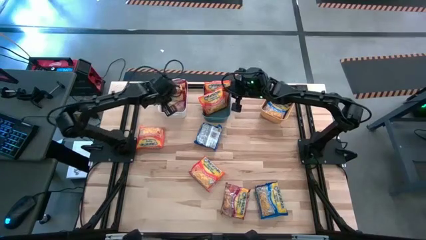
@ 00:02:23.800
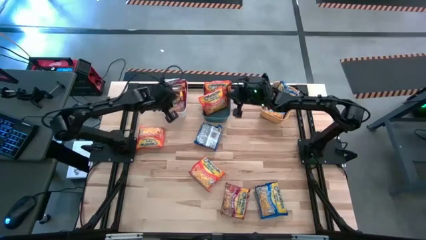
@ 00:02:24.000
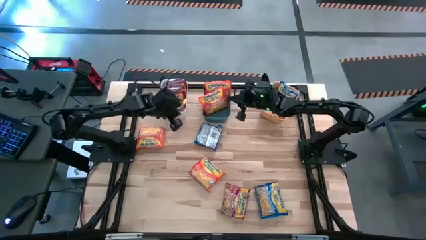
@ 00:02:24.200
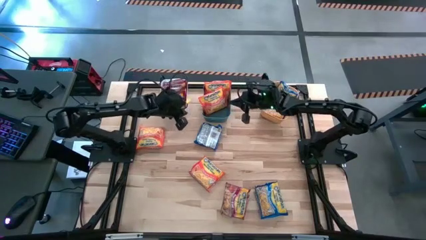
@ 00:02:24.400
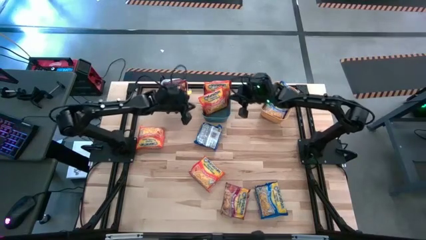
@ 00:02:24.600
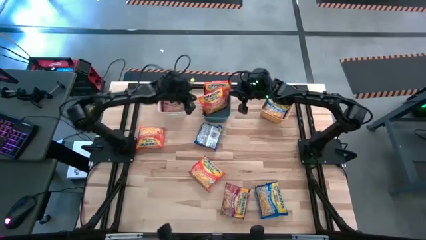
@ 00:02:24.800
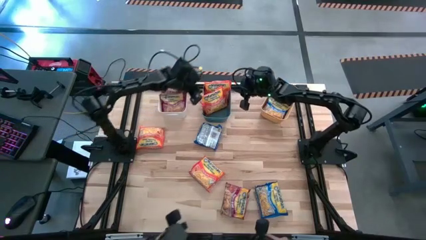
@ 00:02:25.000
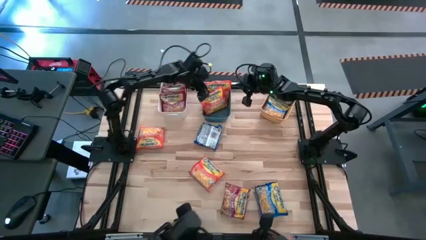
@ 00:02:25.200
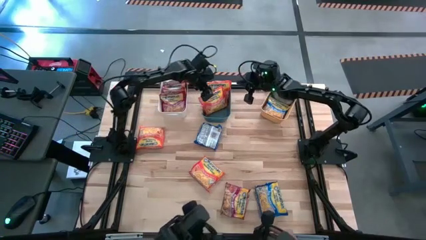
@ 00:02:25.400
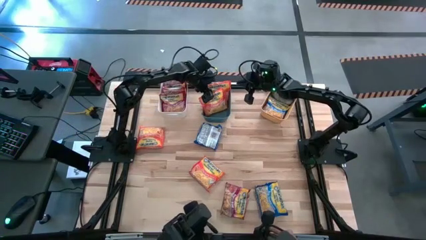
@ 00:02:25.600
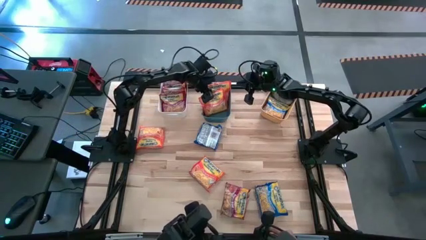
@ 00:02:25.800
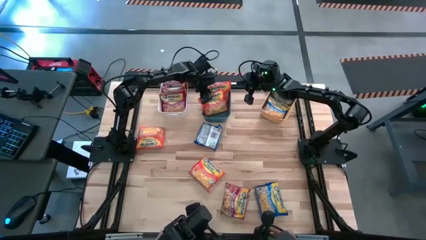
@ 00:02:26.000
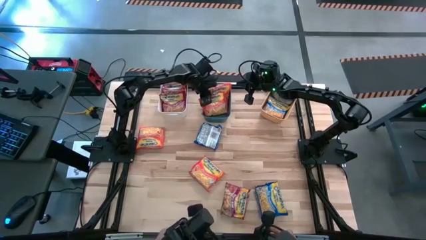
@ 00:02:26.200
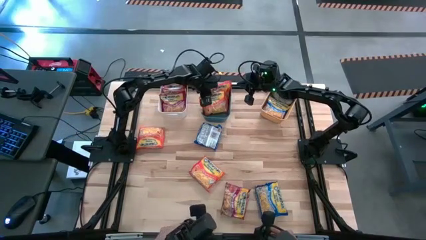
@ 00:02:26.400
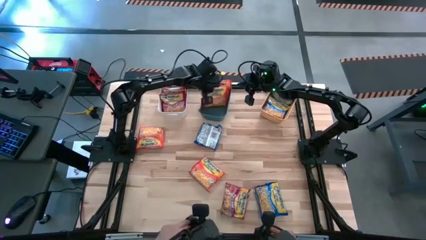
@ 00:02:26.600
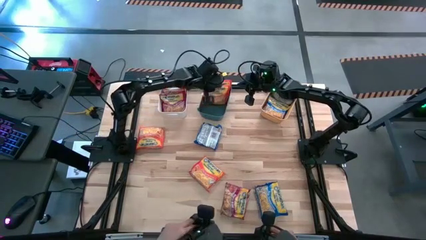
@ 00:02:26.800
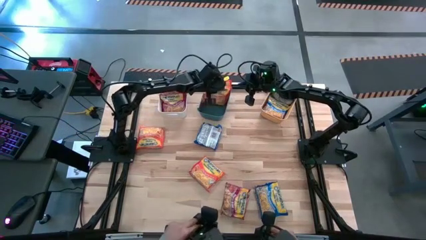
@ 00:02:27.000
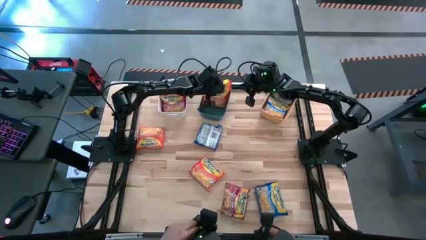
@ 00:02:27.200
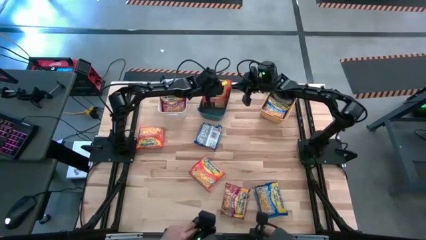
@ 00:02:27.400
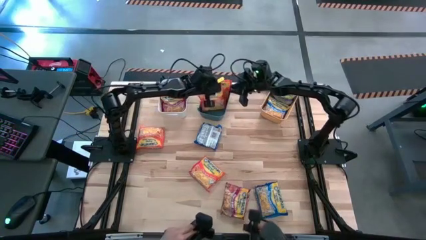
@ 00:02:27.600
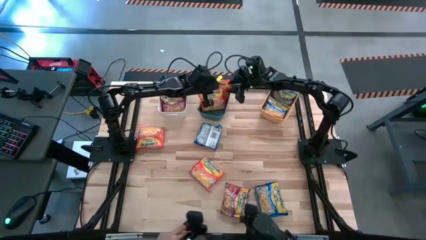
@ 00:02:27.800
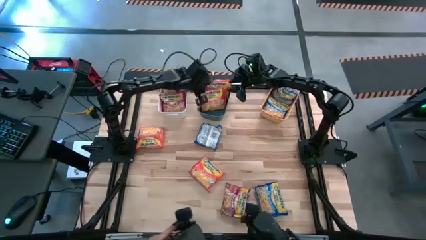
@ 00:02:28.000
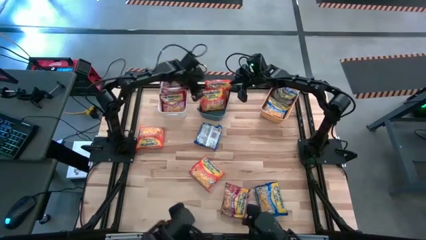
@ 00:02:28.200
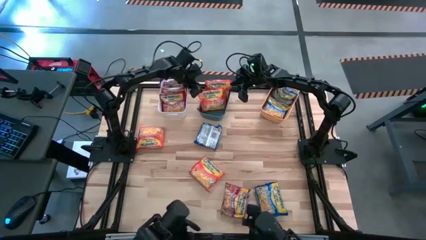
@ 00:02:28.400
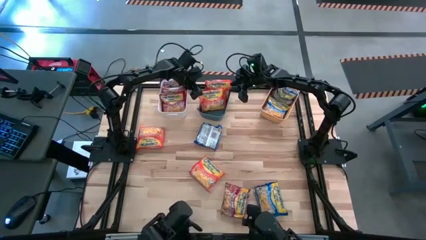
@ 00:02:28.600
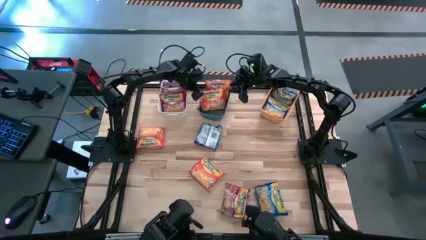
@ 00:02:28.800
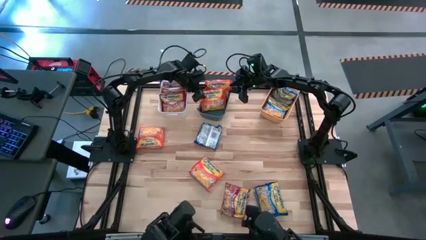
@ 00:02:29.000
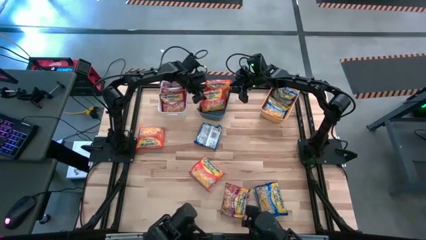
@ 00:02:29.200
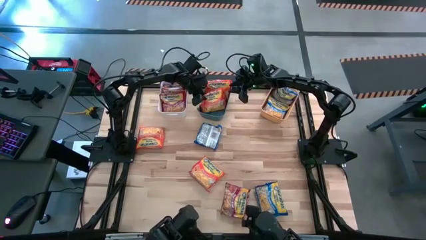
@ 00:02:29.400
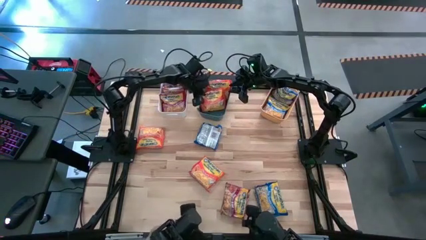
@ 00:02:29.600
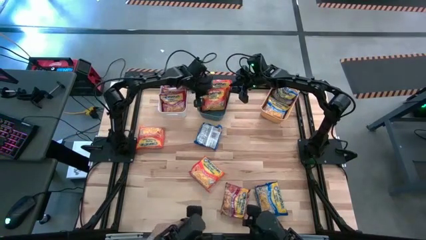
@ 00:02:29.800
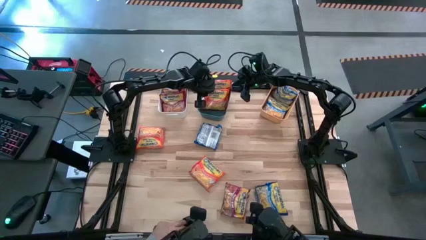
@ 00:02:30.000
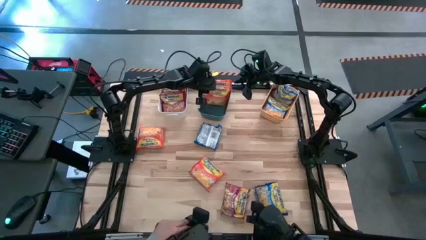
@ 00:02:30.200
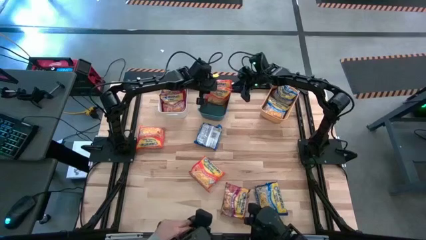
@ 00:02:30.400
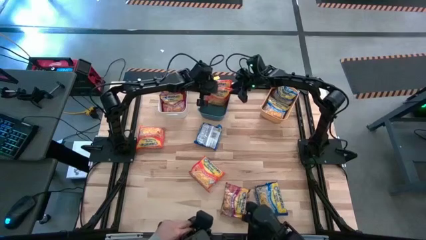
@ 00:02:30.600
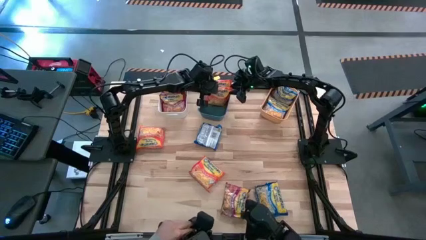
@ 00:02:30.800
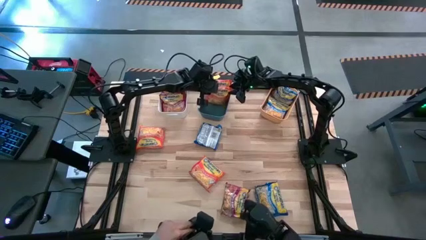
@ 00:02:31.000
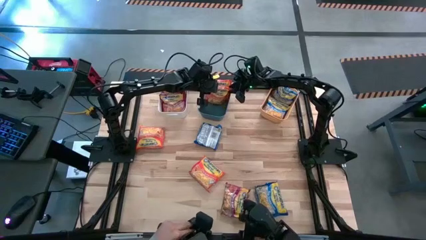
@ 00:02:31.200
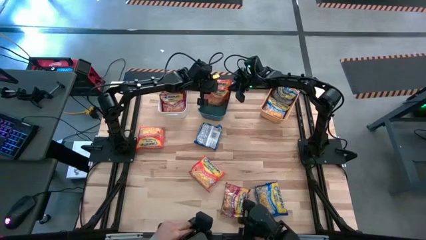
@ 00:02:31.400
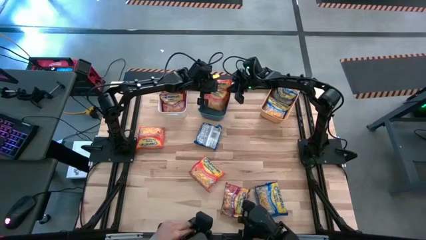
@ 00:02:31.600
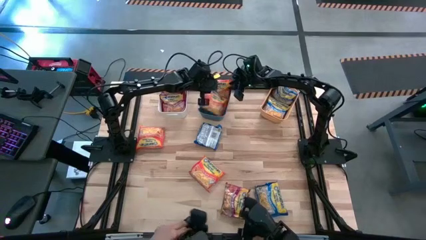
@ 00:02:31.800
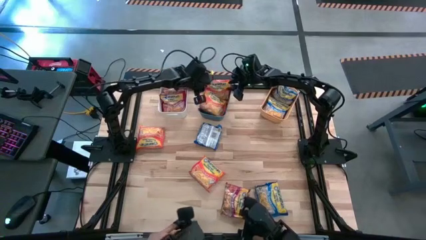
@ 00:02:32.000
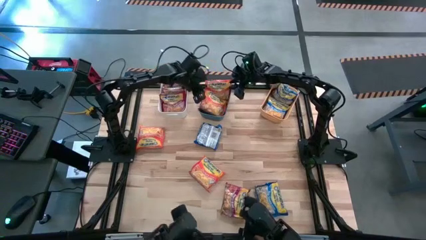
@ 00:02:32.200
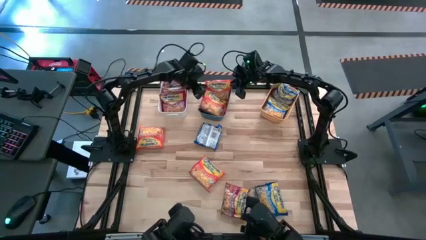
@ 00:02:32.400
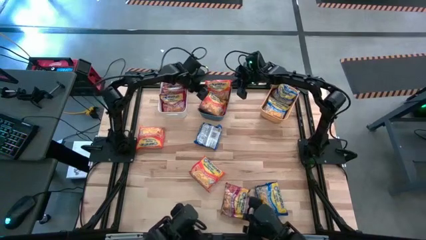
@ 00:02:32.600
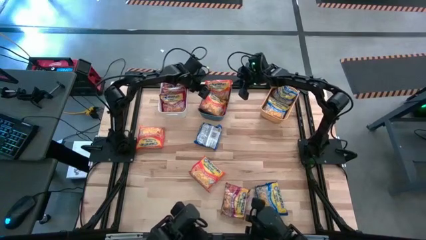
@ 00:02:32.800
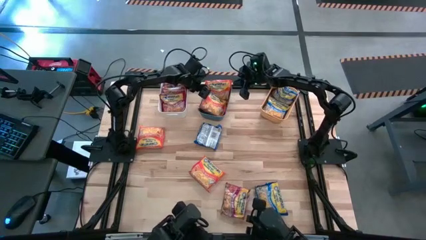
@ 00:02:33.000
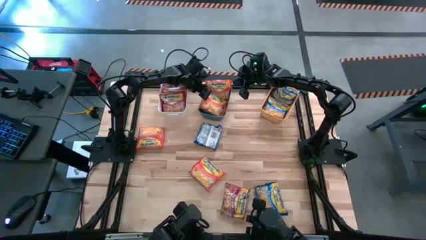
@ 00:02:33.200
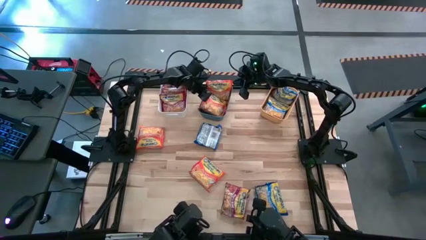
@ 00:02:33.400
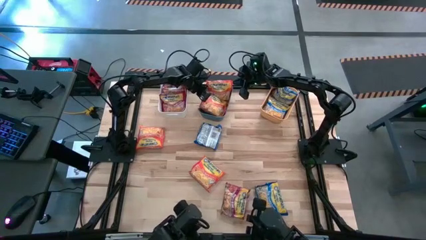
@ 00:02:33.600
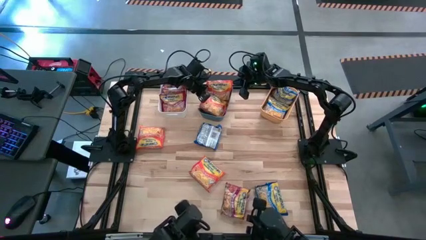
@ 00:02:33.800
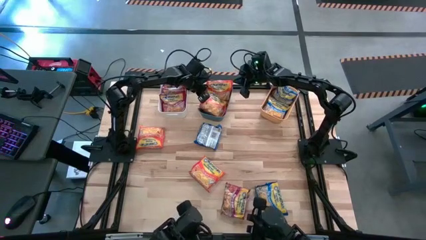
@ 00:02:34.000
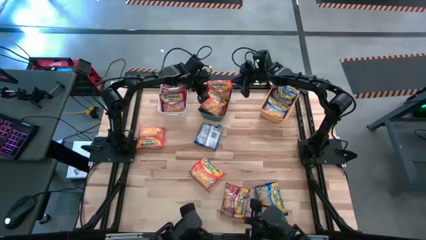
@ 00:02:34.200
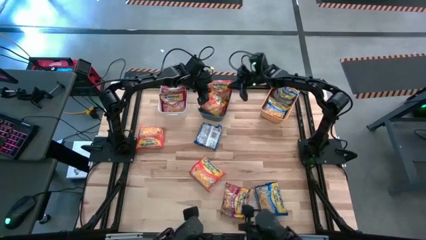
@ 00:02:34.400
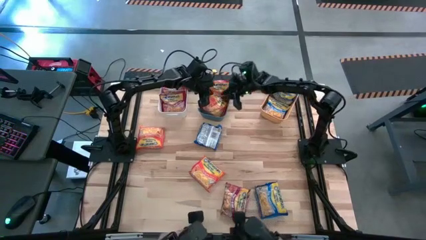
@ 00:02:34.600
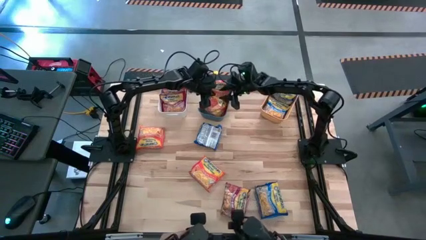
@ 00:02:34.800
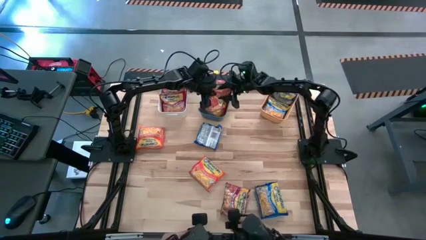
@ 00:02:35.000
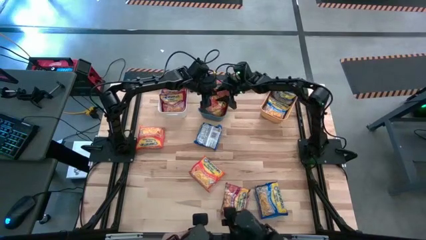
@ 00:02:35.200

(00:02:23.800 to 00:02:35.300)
Task: Sort Maruchan noodles
Adjust the orange noodle packs into the blue bin

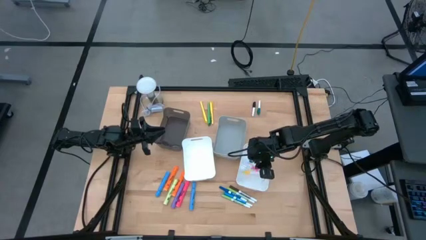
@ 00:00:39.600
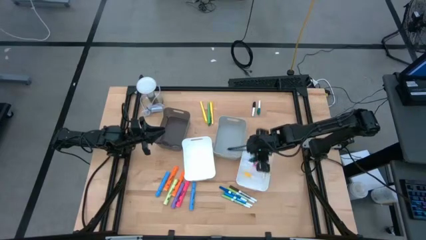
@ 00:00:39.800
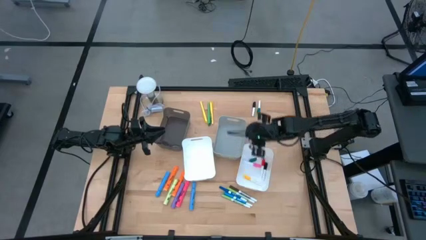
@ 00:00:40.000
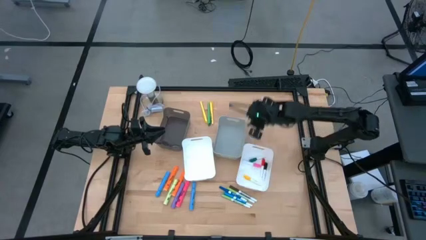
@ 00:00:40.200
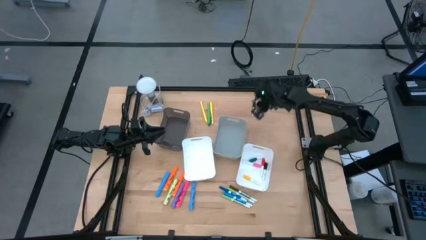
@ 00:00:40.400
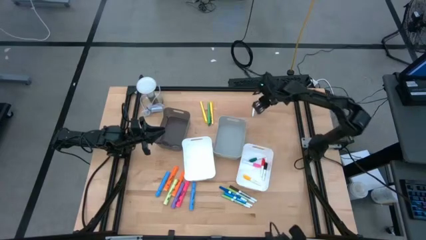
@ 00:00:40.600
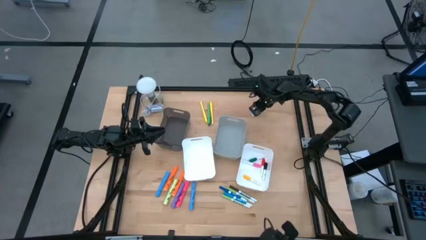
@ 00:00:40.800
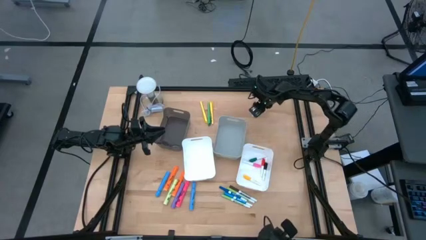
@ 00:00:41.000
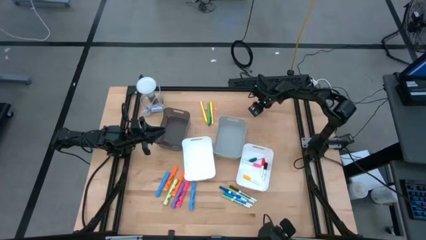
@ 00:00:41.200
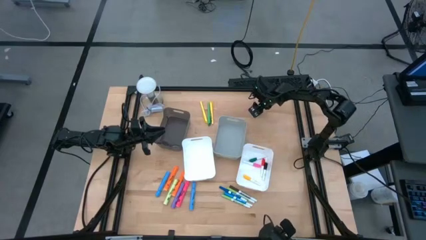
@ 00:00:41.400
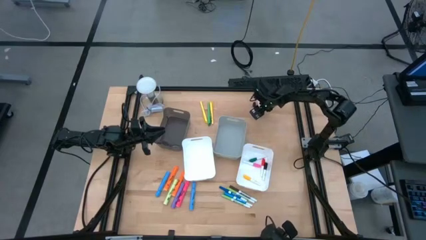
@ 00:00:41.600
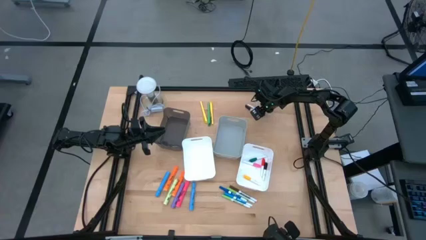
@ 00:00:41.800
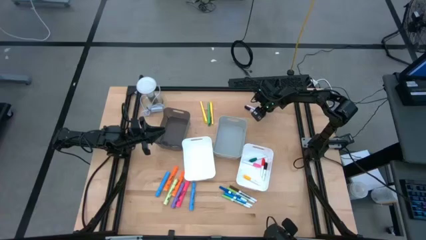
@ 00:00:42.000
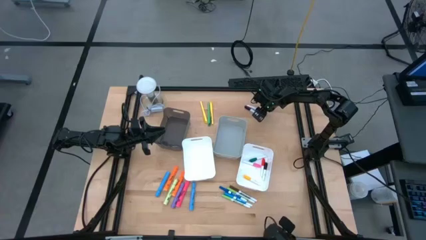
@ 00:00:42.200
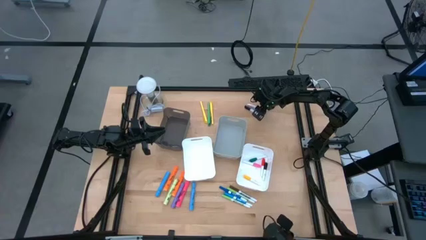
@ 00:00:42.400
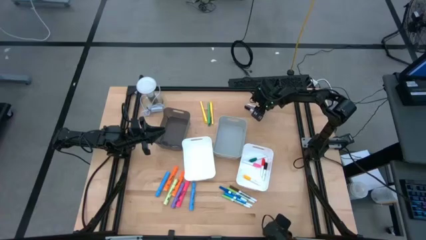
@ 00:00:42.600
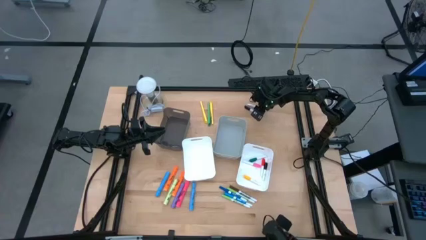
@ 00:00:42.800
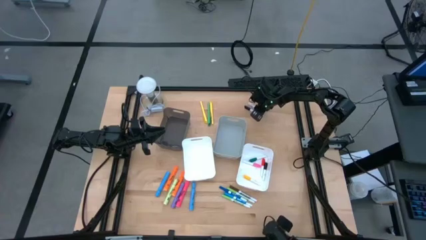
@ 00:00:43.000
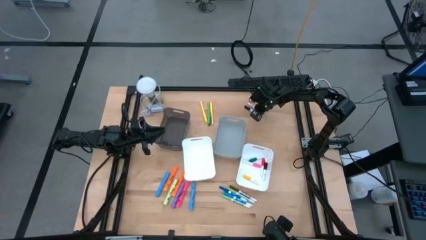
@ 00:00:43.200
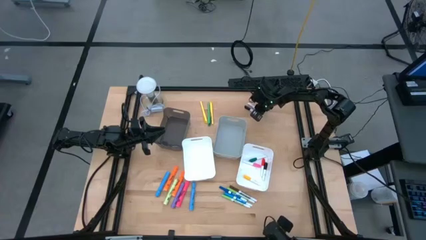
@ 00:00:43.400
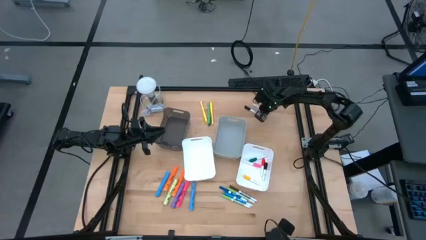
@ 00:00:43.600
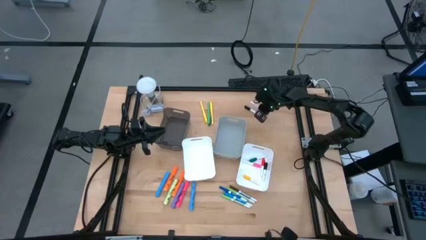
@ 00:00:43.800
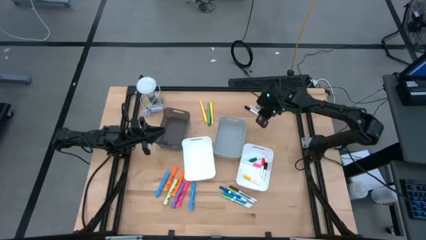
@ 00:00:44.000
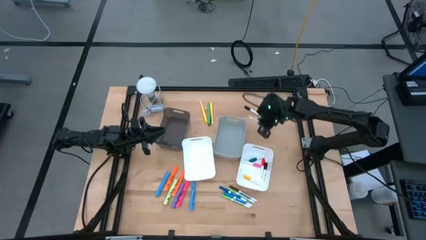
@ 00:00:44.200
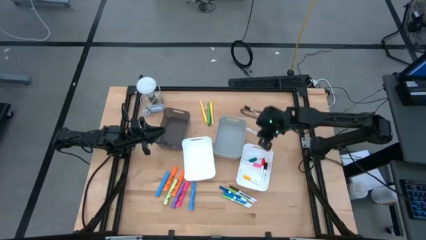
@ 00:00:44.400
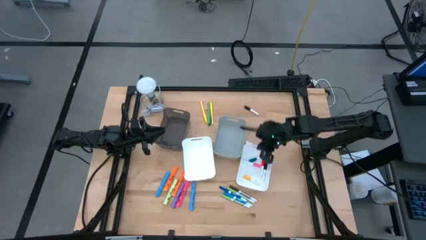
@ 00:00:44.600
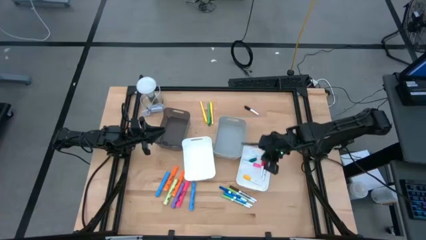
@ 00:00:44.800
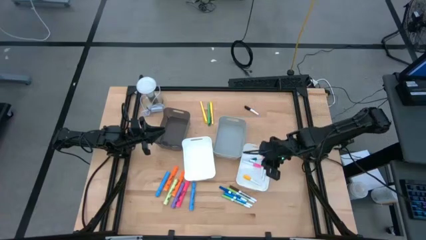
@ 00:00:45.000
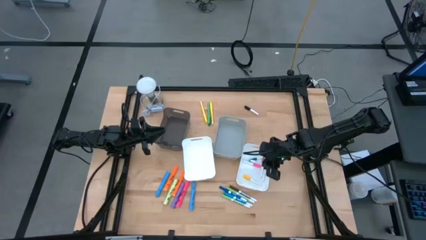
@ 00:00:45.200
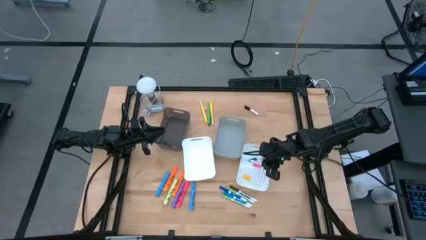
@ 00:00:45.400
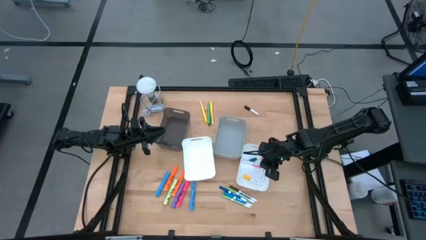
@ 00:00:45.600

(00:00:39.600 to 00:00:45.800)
Task: Pick & Place Markers
Put the green mini marker into the right white bin
